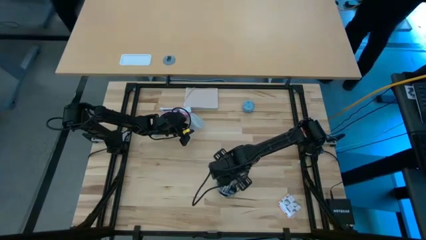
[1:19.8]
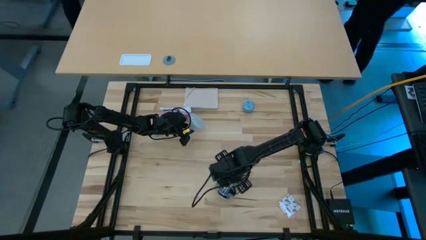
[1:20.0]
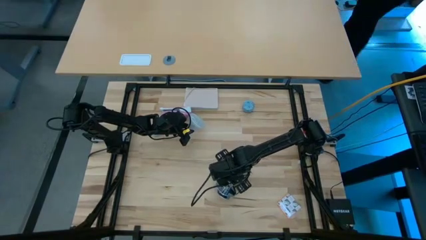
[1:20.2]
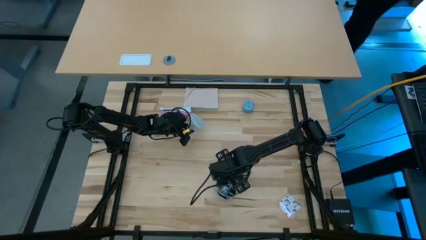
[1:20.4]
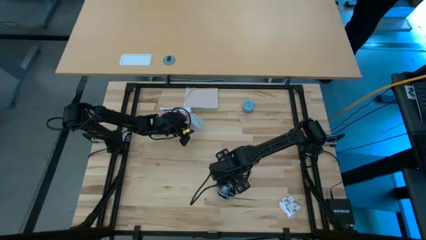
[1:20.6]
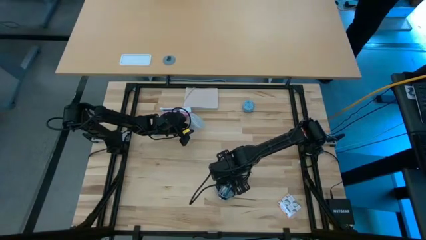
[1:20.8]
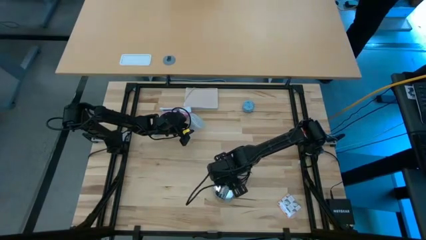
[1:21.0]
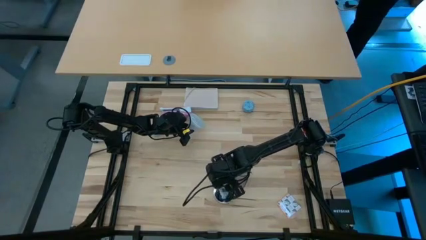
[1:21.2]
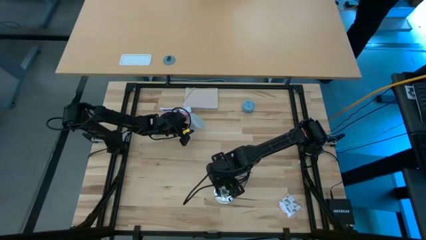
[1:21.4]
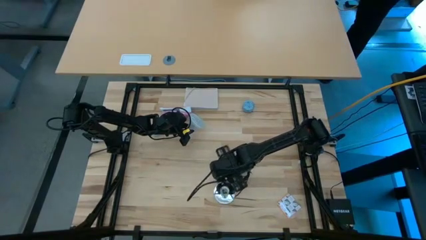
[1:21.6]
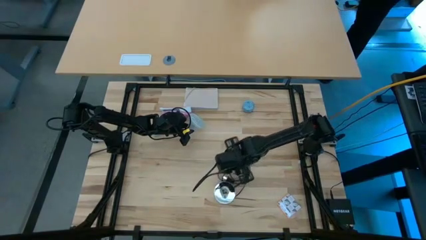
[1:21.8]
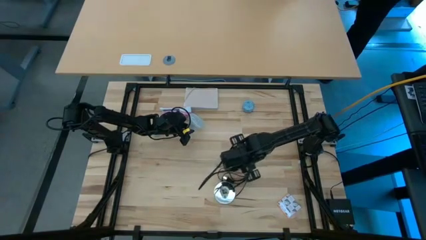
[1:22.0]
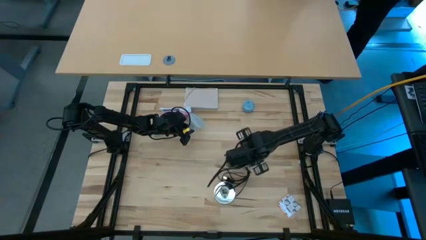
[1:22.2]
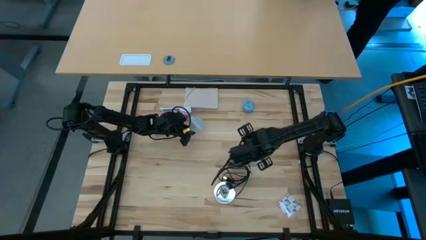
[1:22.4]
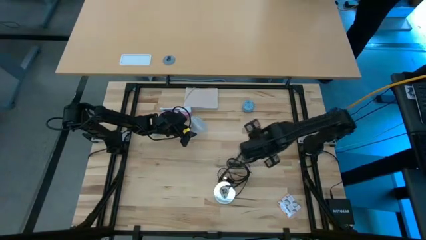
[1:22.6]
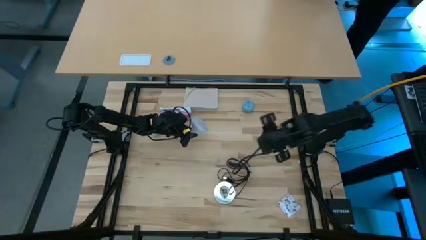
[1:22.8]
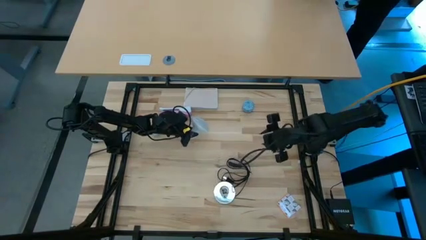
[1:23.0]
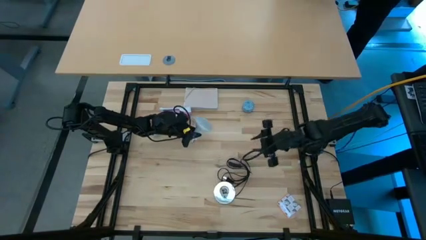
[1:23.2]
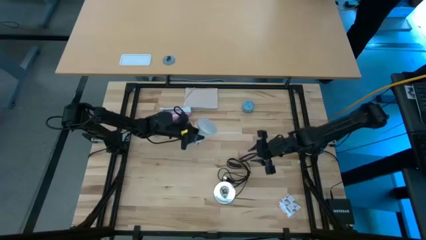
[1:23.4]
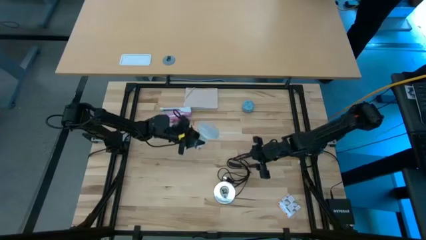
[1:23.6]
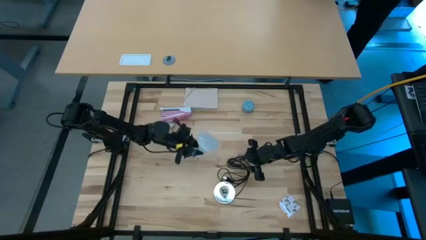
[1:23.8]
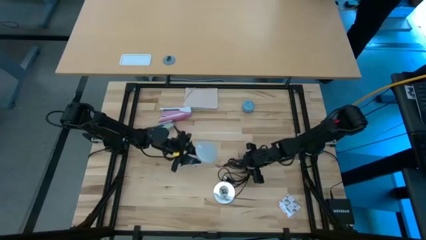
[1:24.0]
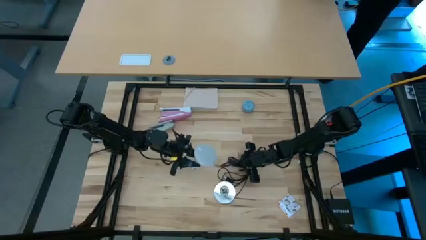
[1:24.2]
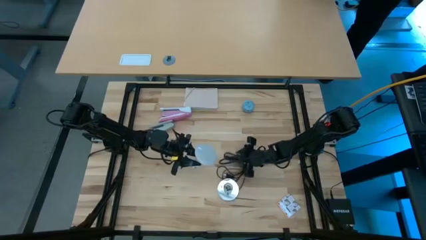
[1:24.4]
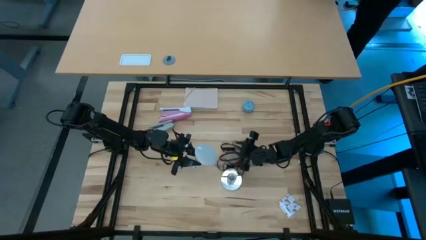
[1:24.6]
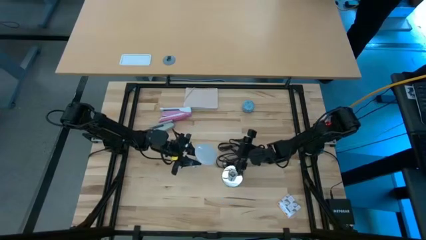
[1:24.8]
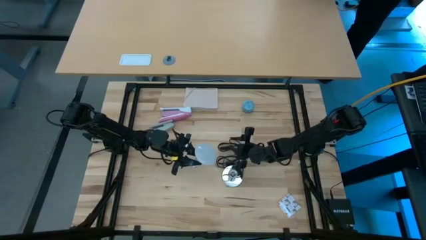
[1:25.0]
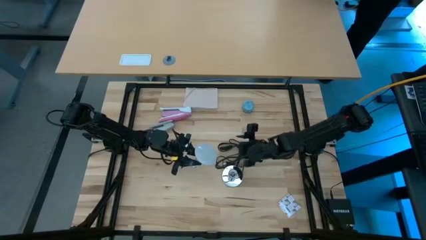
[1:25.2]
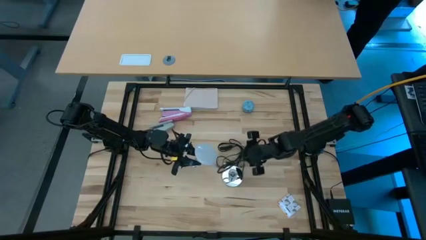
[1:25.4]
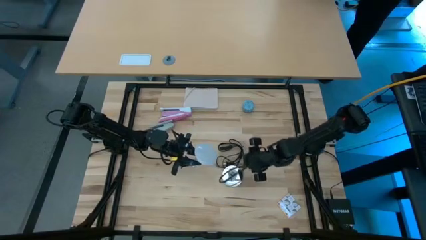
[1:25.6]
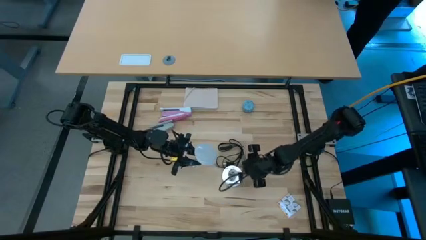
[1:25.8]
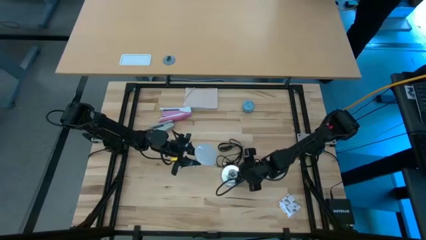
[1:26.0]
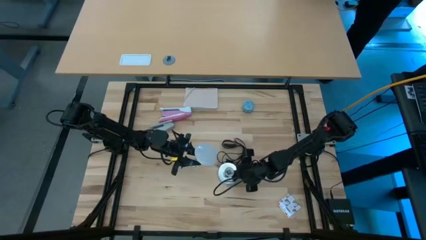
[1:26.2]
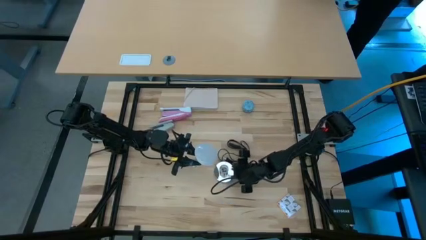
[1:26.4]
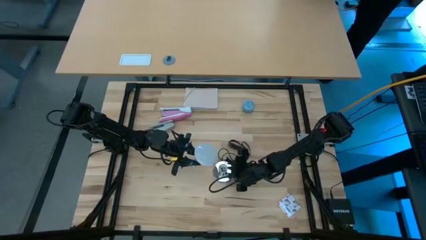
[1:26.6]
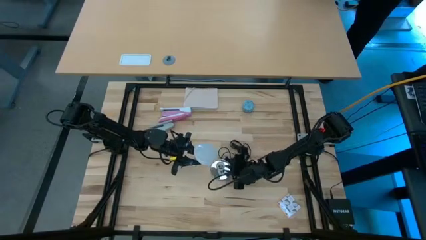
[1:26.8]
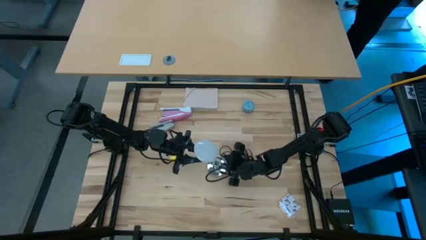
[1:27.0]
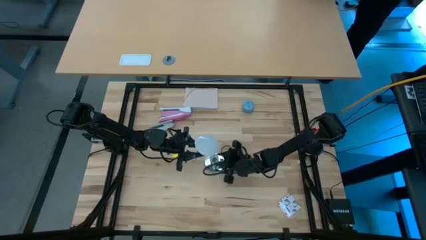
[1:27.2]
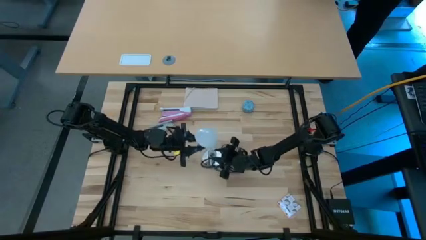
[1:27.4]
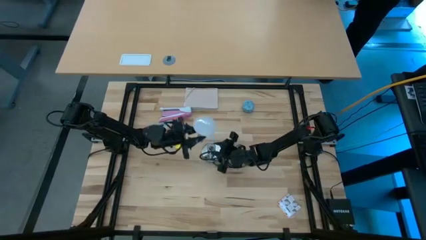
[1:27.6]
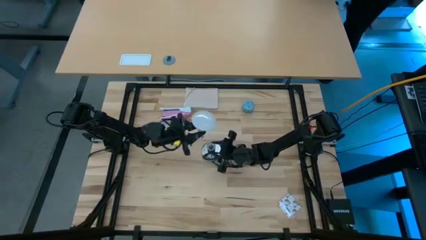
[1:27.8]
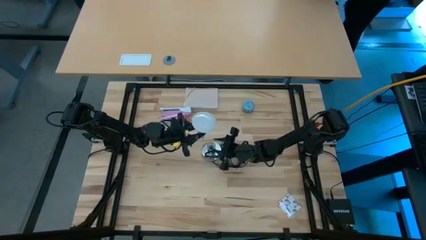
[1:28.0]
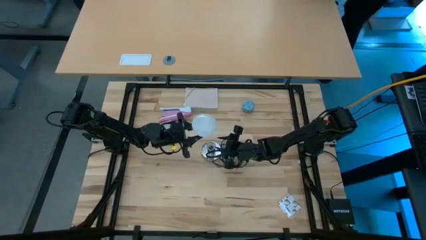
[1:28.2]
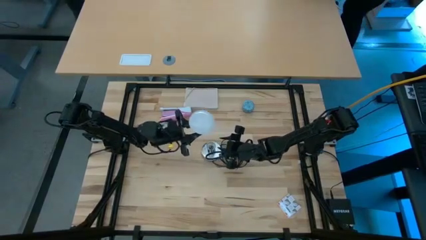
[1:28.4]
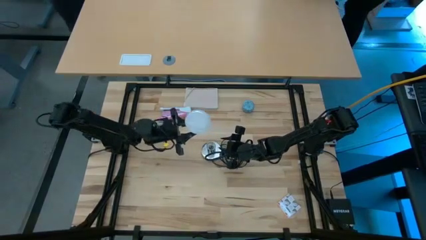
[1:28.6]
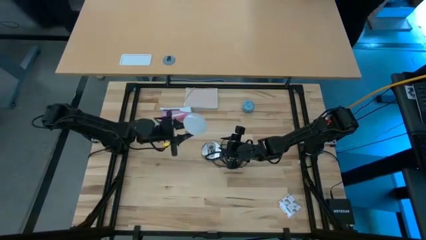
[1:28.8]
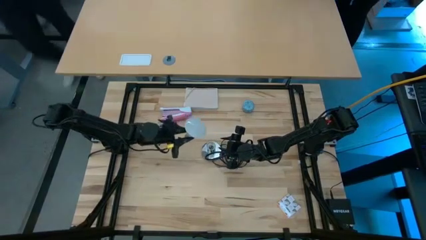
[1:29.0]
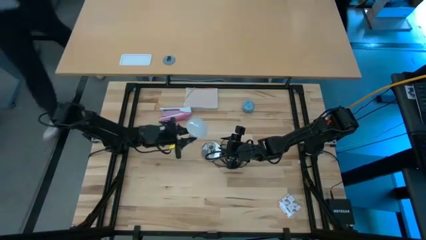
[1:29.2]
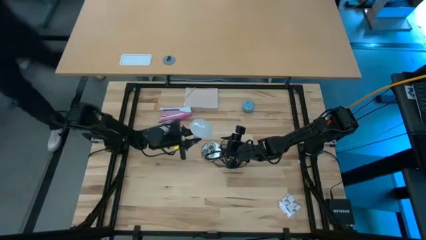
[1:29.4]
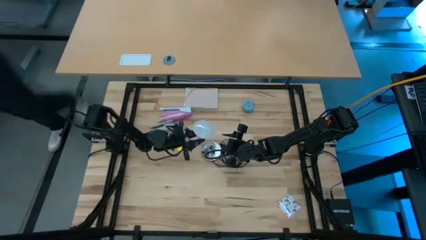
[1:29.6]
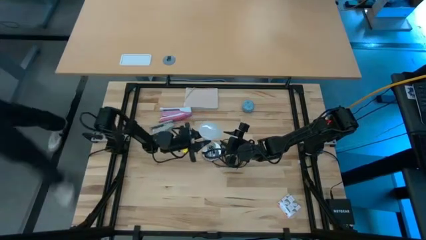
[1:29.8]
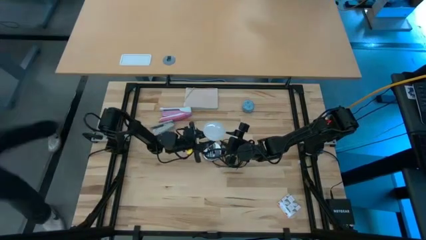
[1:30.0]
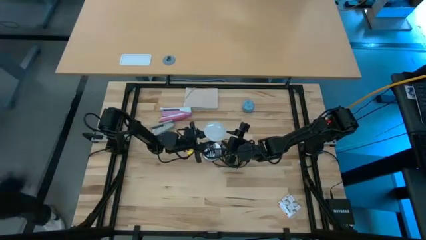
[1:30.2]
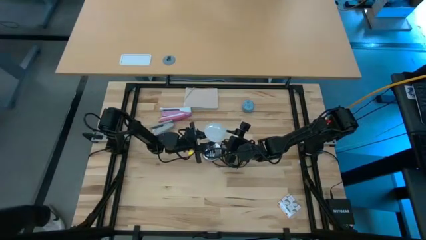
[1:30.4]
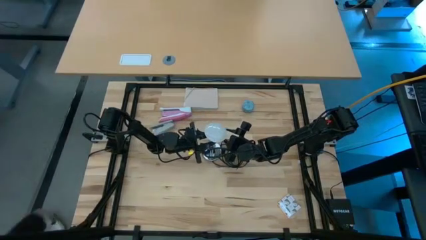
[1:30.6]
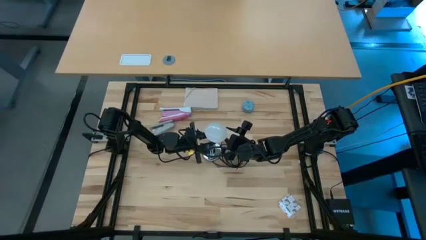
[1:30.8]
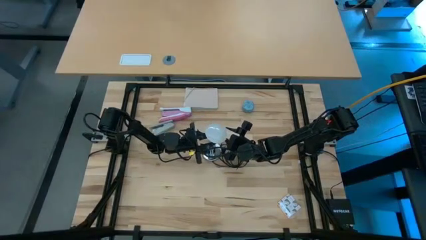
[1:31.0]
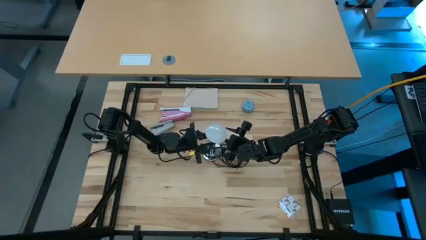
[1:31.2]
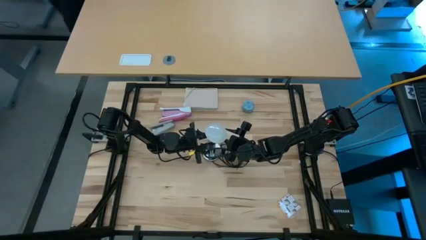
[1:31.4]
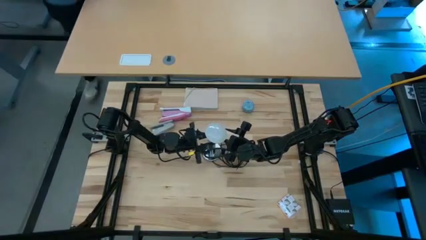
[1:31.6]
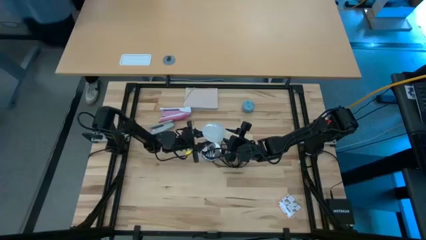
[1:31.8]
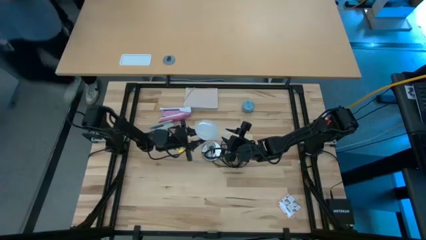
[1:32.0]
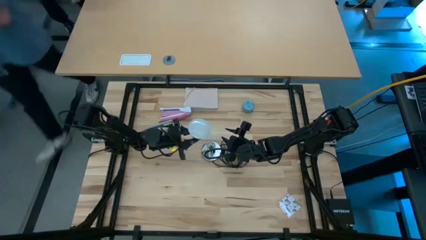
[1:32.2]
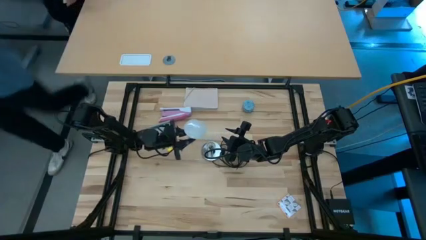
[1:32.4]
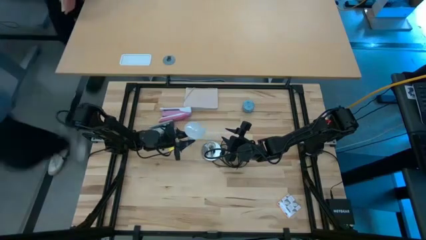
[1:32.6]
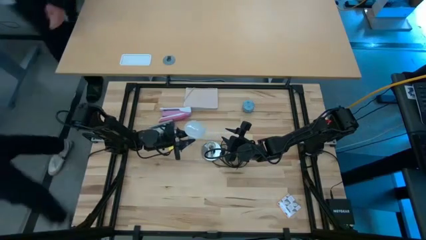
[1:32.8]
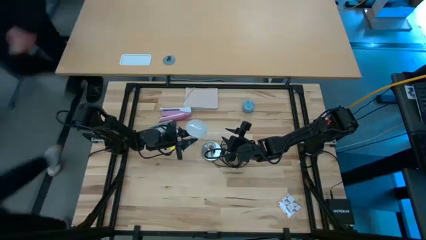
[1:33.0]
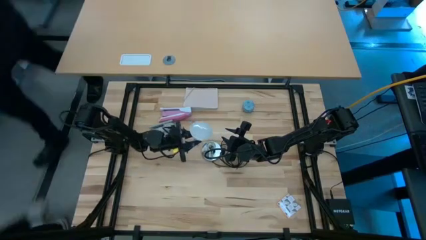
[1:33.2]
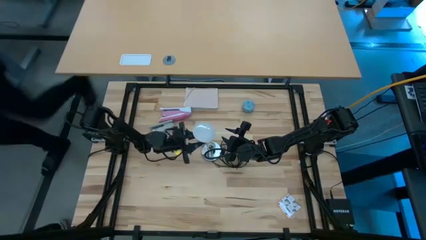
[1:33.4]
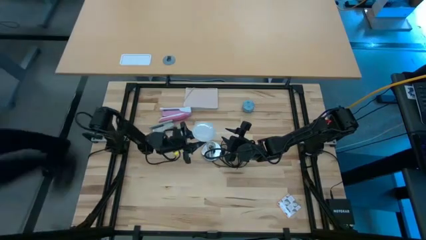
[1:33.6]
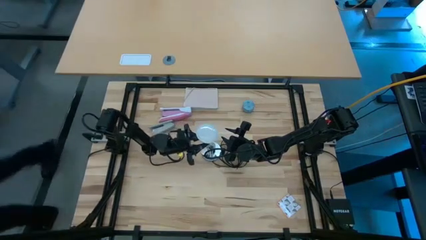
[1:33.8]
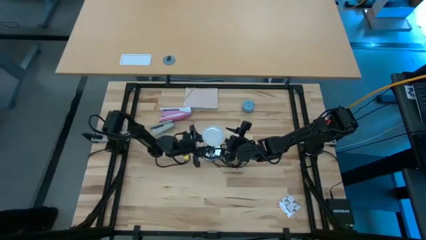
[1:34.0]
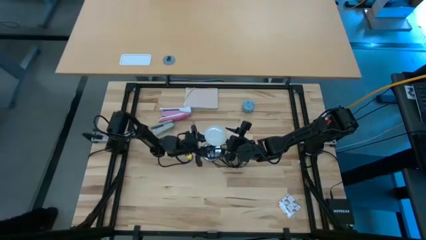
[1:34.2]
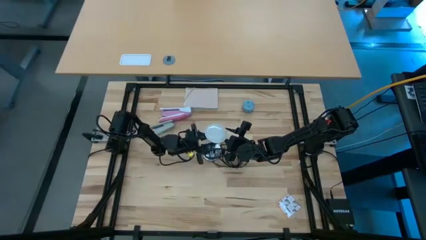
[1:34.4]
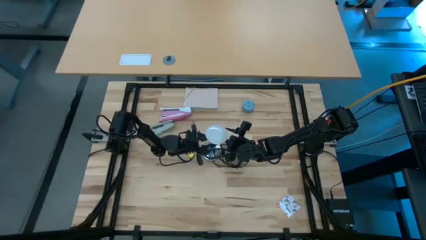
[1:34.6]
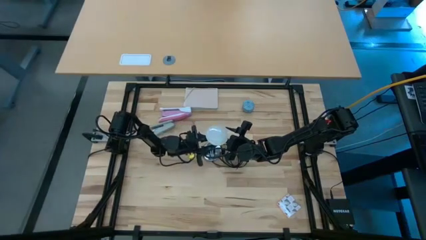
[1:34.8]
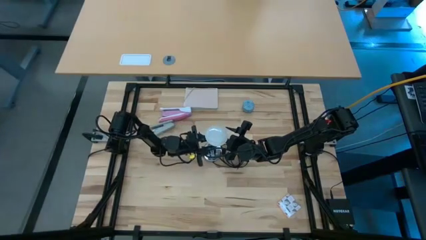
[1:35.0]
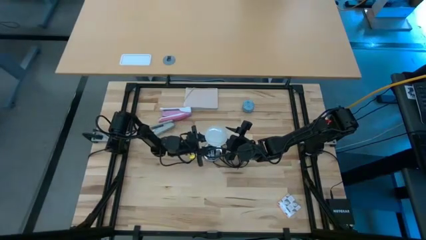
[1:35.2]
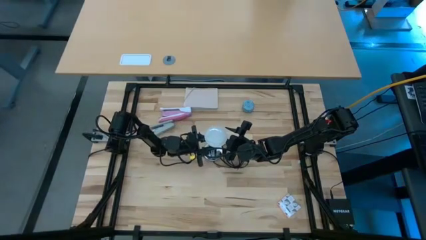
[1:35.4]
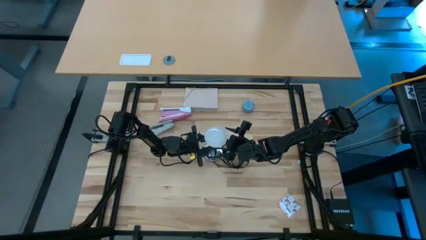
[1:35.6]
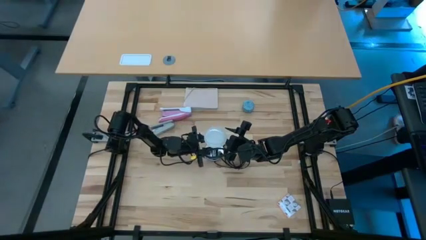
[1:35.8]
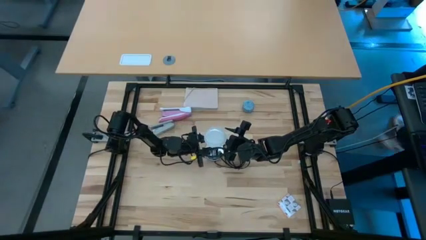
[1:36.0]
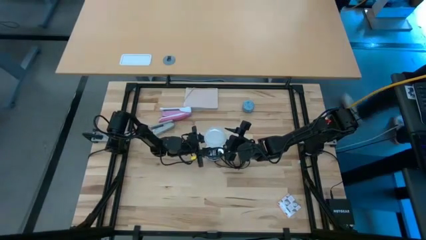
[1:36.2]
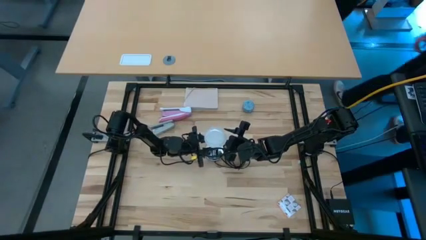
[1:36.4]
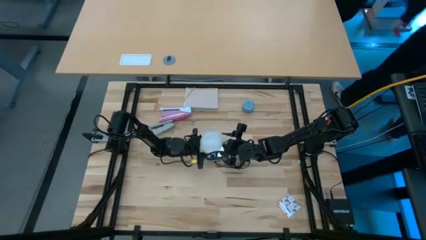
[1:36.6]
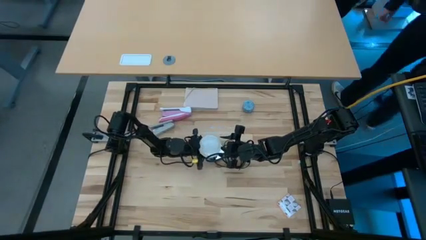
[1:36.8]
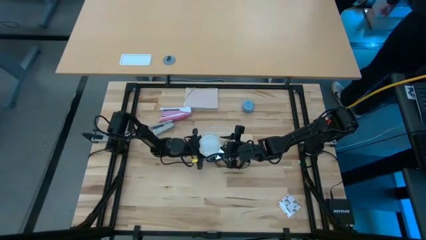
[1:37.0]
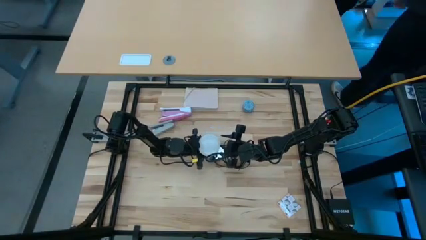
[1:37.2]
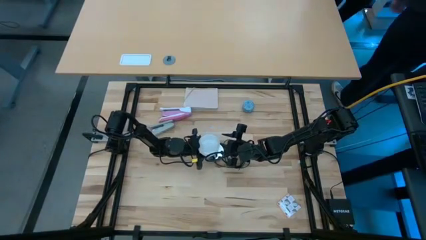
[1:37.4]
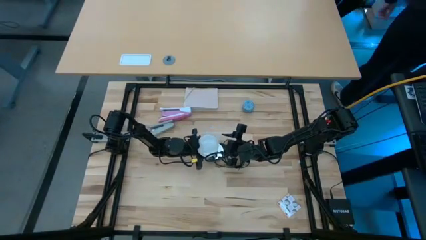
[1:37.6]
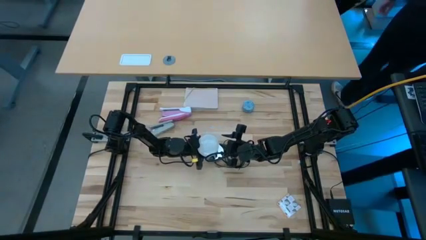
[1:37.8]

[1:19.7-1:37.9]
Task: Screw lightbulb
Insert the white lightbulb into the desk lamp
